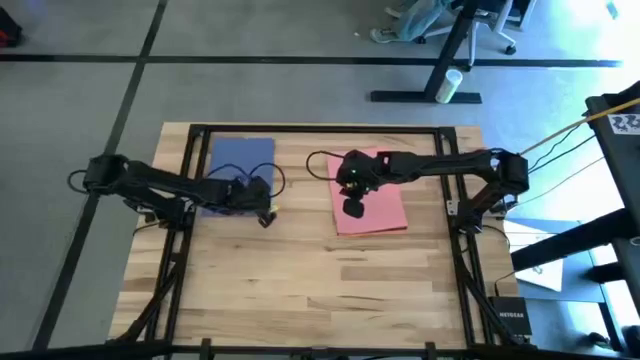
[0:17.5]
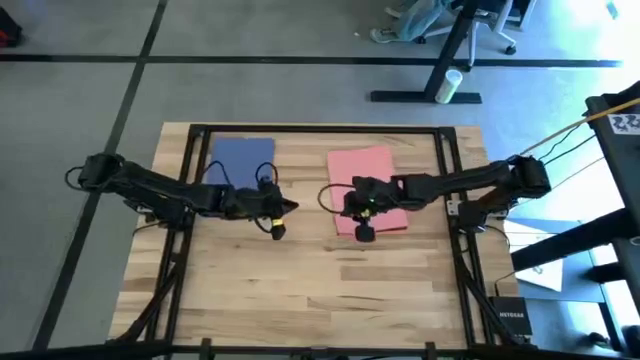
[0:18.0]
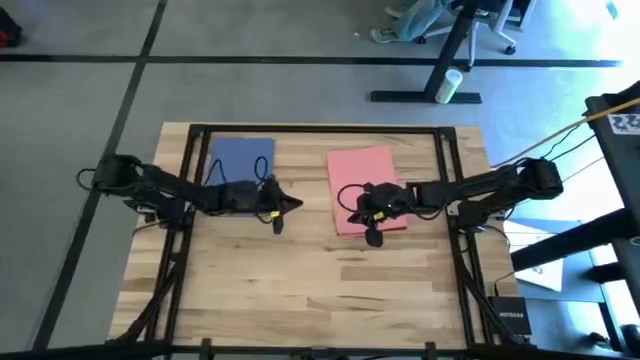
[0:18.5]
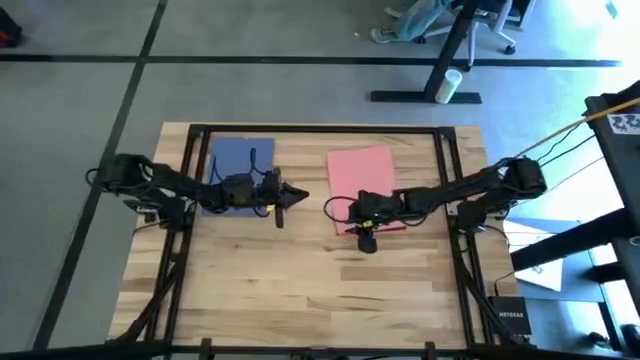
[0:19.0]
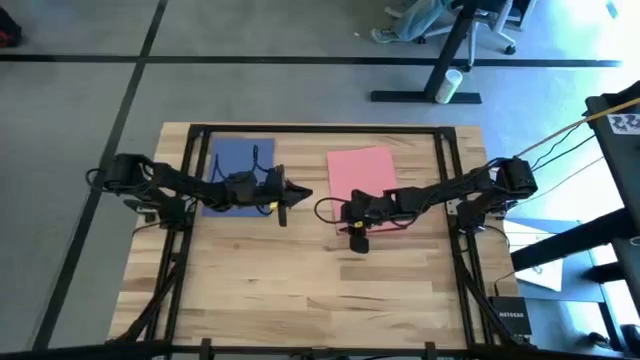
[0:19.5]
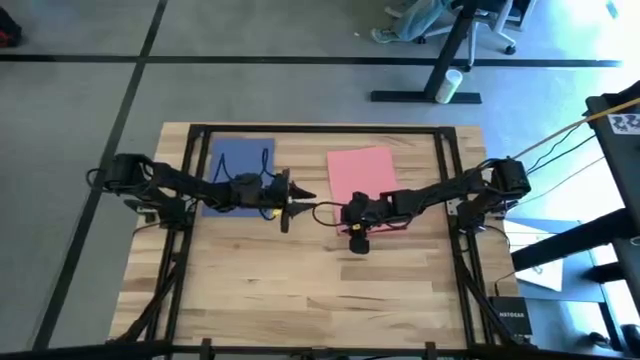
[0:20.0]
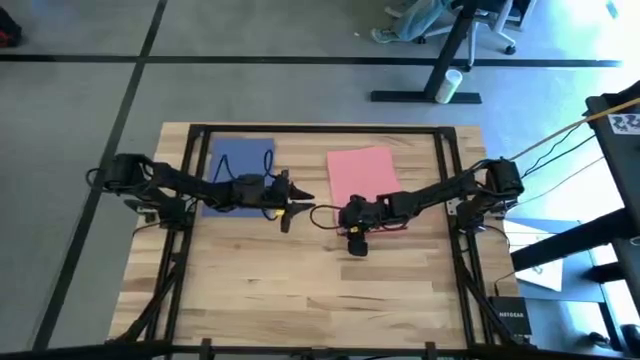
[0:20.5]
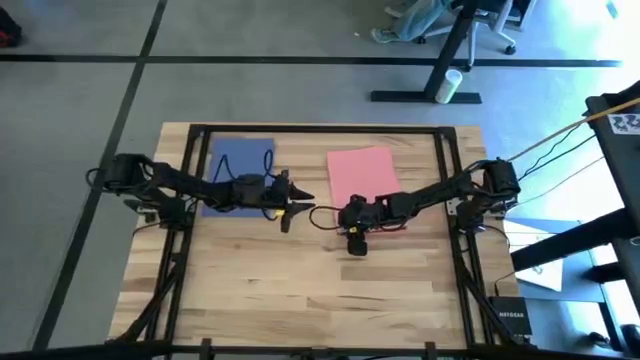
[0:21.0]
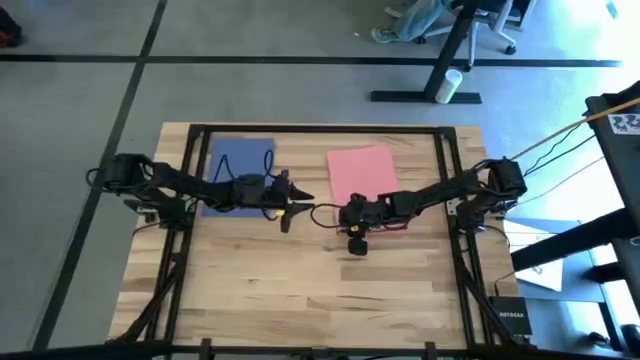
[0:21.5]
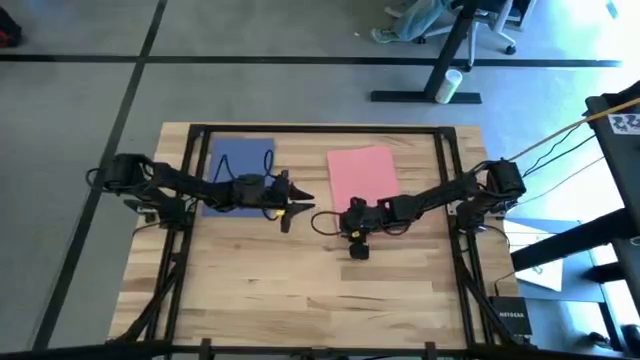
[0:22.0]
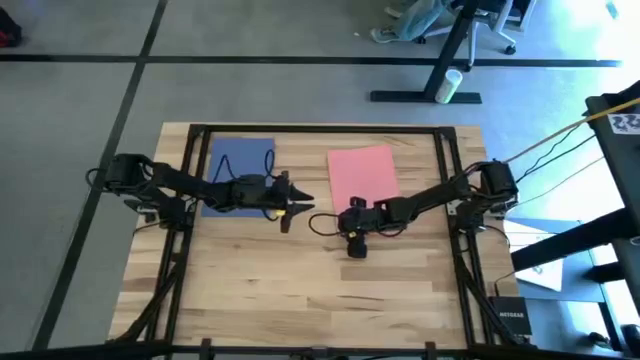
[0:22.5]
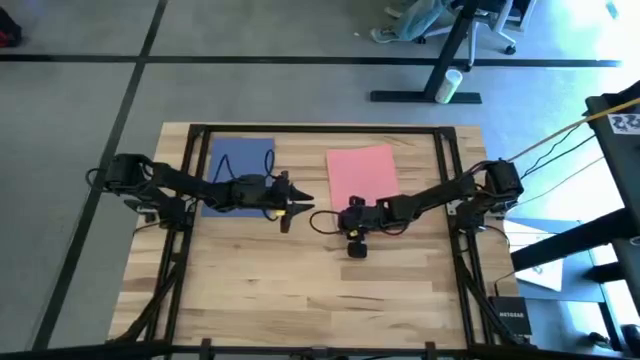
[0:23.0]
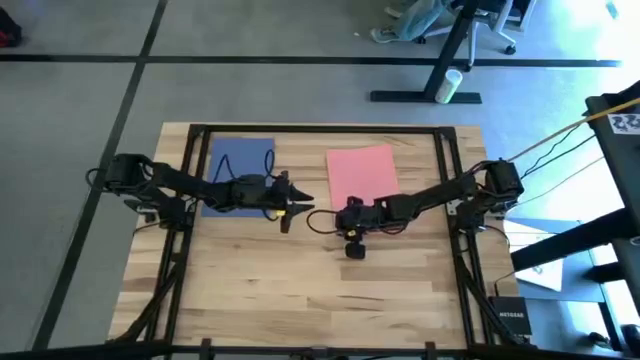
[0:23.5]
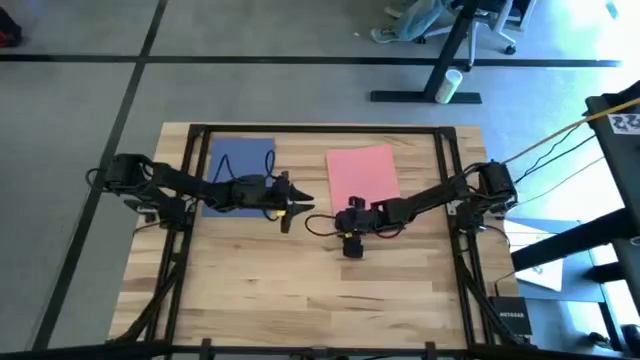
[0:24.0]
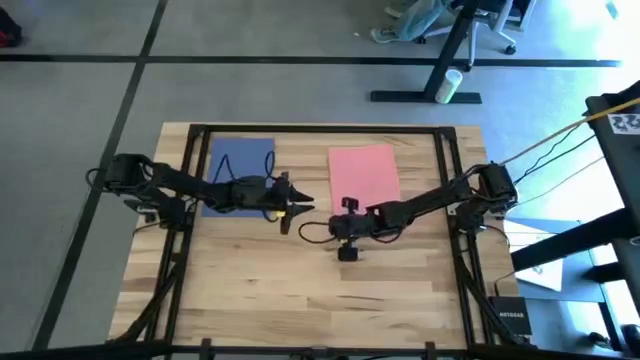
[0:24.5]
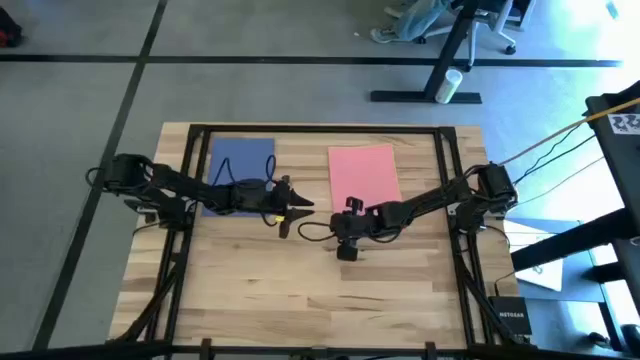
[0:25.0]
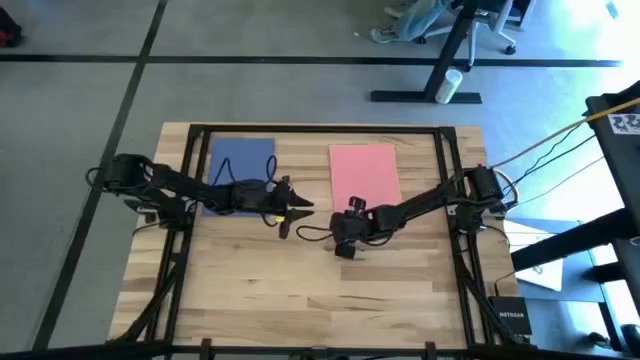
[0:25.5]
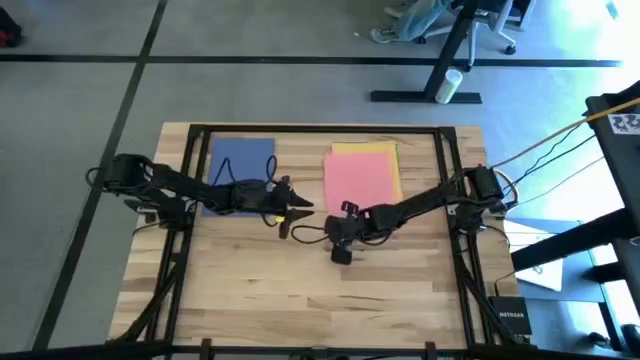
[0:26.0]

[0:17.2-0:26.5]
Task: Organize paper
Move the pink paper to the bottom left of the table

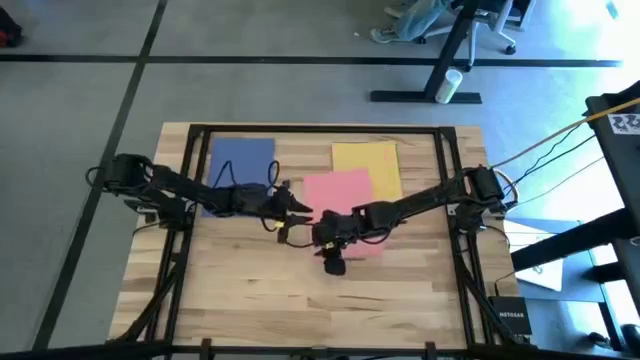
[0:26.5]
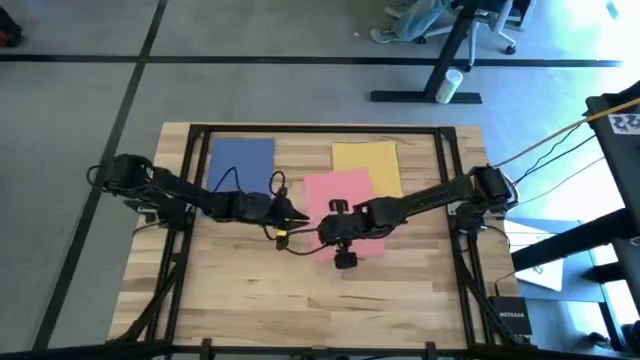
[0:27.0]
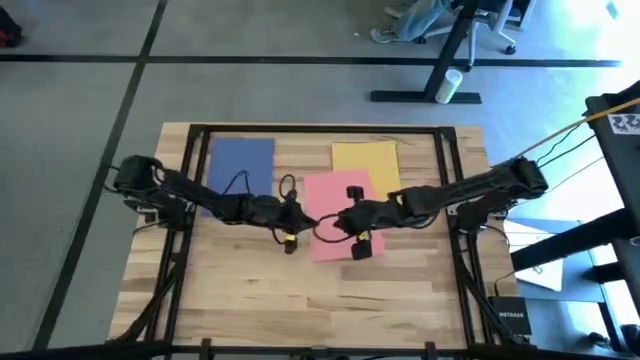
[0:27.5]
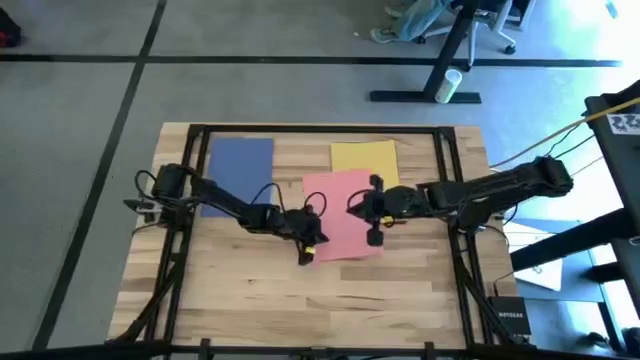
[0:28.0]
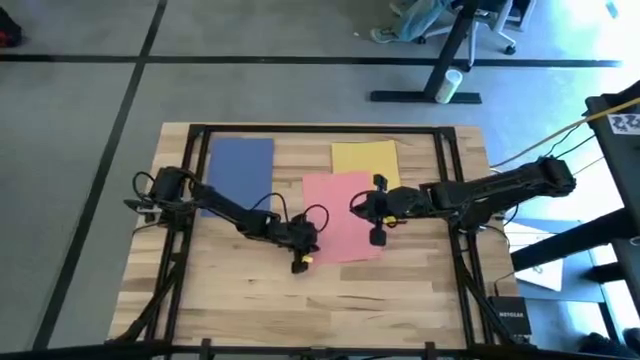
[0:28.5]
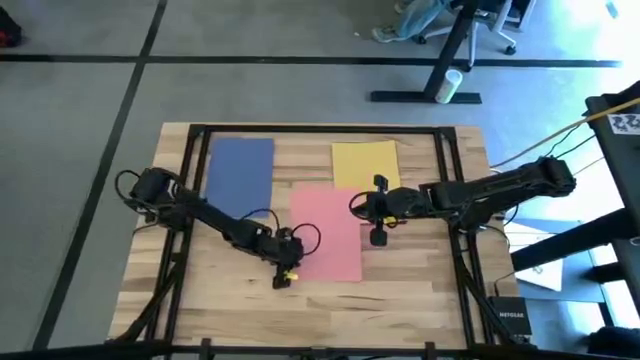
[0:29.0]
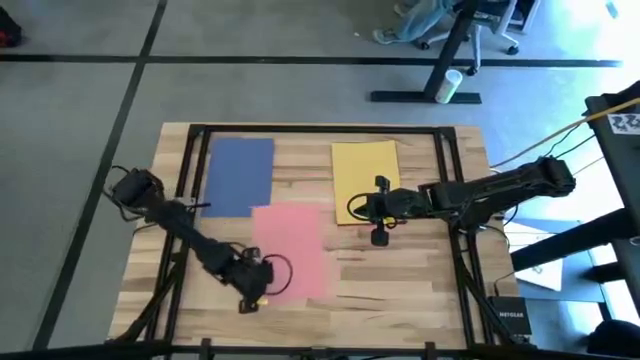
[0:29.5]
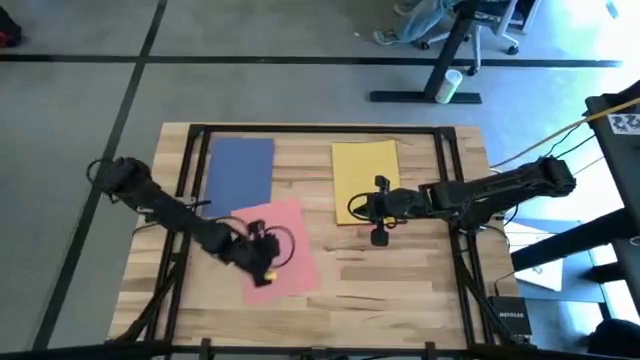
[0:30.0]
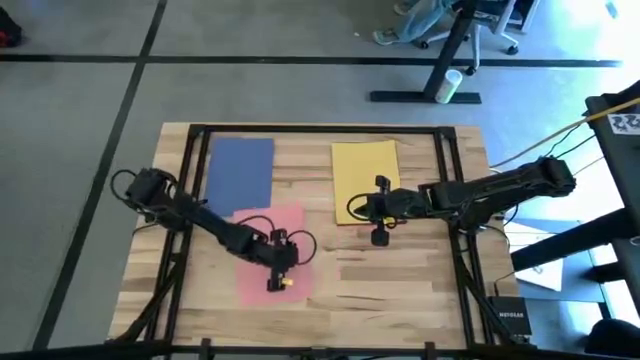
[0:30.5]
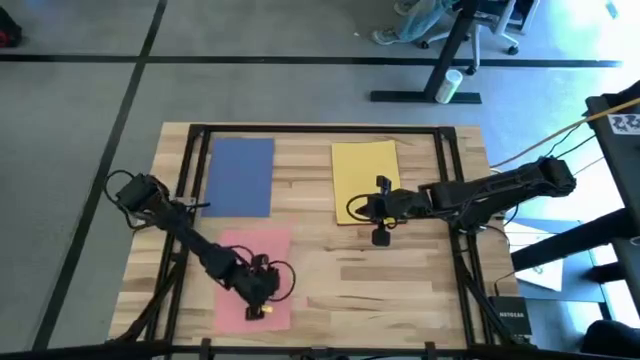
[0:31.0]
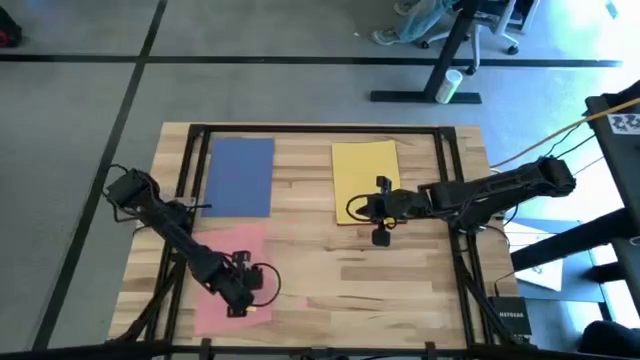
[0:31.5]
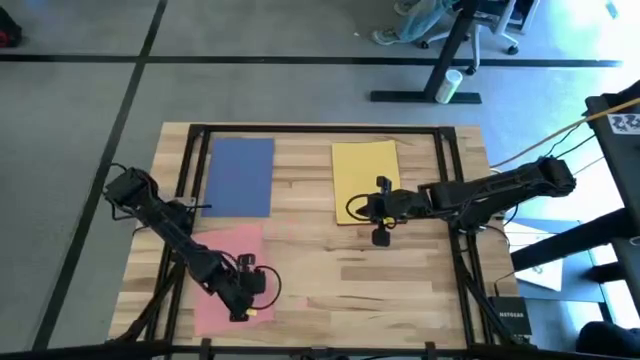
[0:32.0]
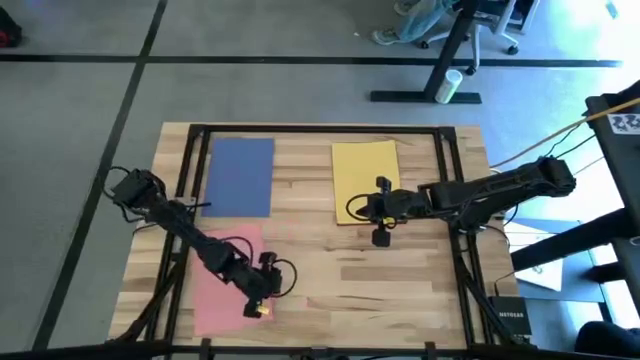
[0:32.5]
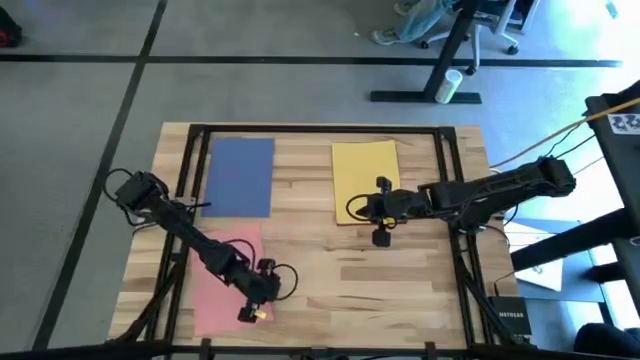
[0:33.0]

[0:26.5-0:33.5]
Move the pink paper to the bottom left of the table

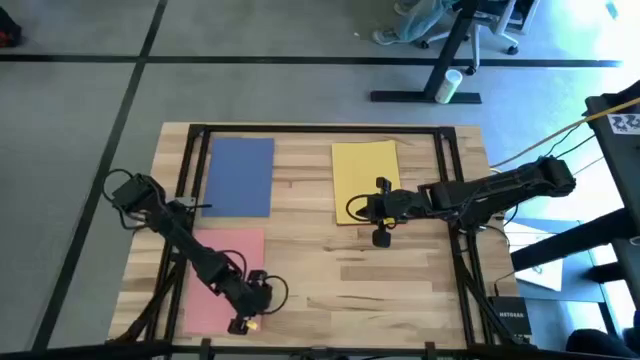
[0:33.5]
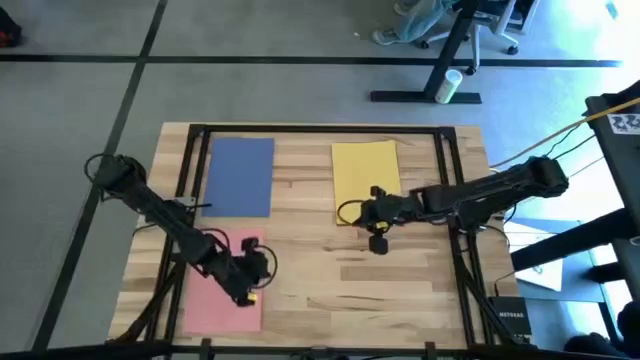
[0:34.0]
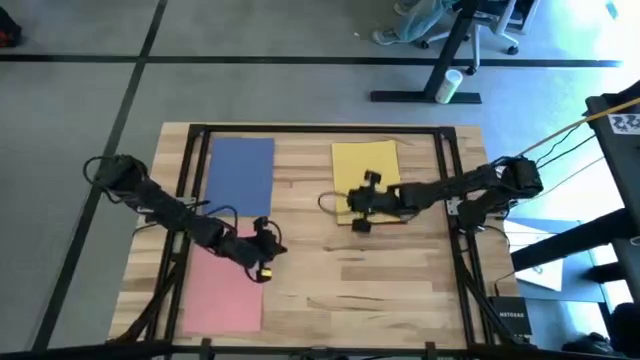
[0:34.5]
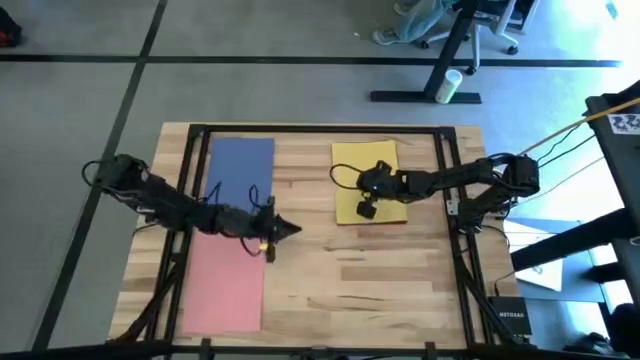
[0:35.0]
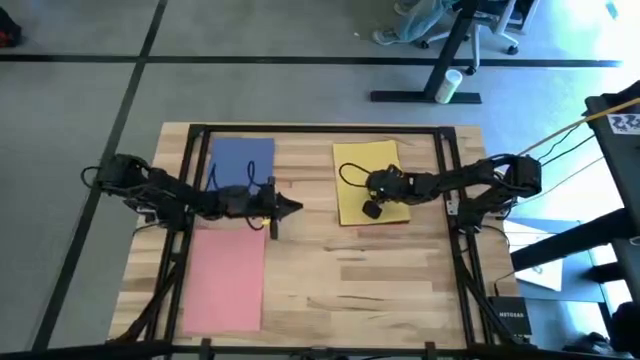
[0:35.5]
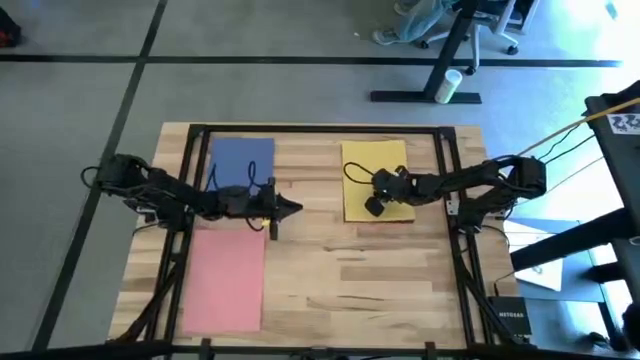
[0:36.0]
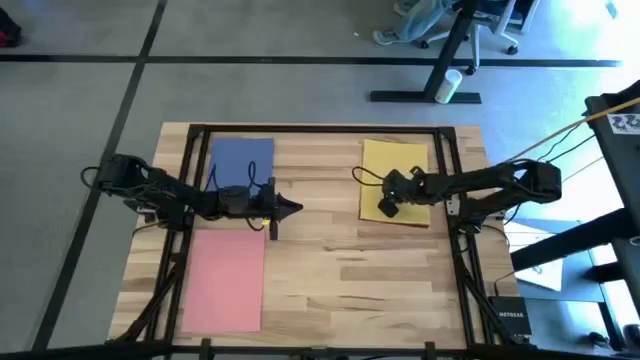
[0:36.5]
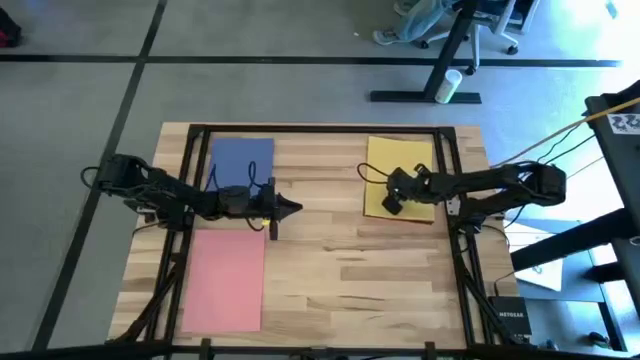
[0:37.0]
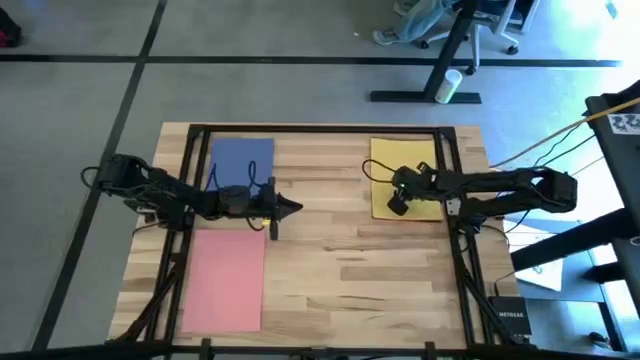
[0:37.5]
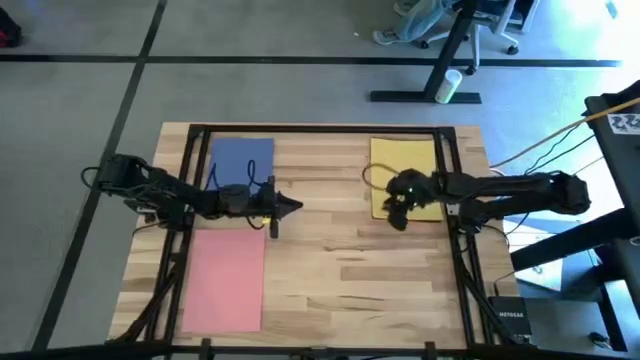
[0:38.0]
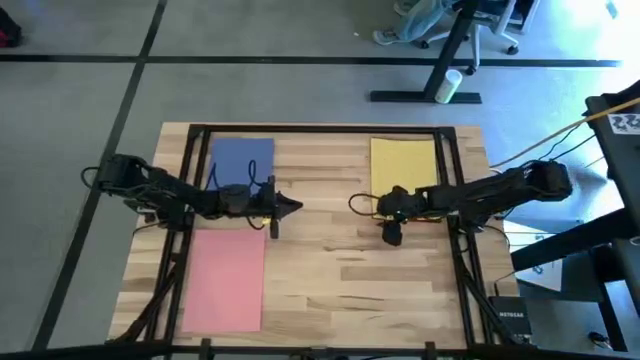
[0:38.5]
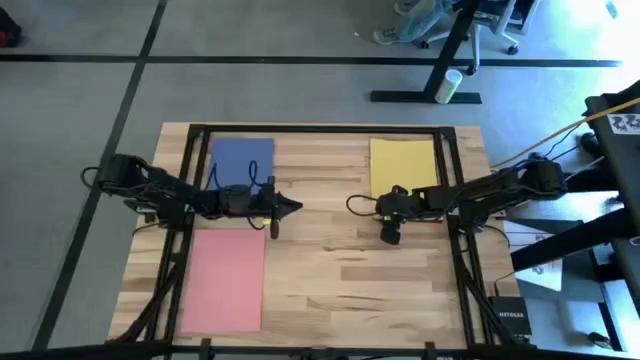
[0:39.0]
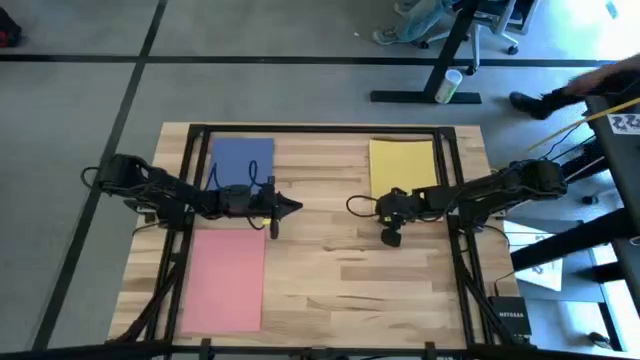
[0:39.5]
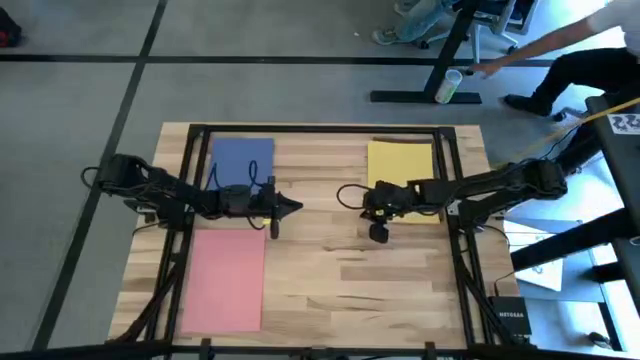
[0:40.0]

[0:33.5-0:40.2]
Move the yellow paper to the top center of the table
